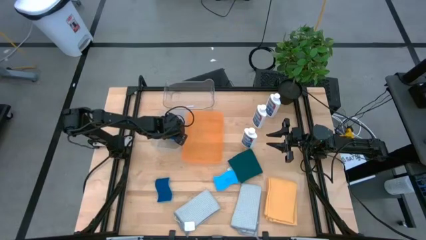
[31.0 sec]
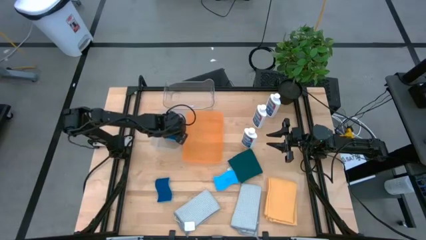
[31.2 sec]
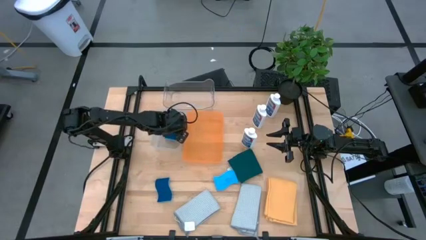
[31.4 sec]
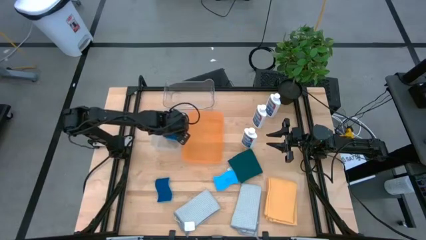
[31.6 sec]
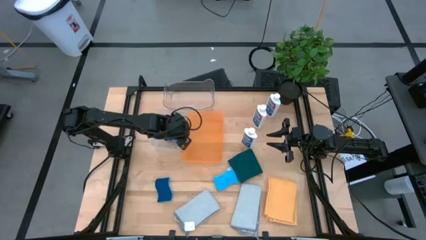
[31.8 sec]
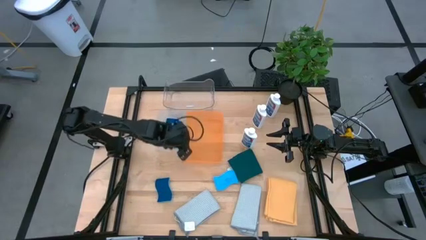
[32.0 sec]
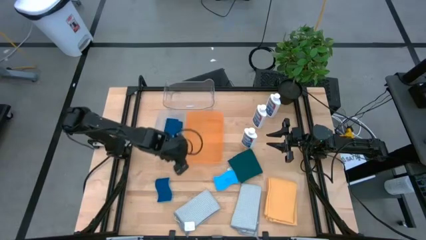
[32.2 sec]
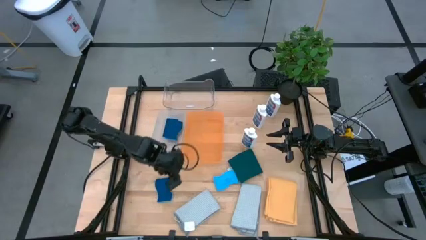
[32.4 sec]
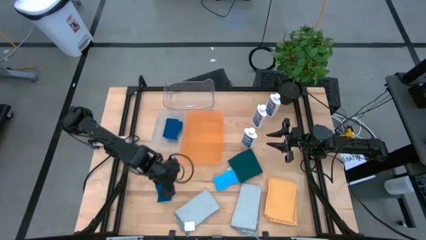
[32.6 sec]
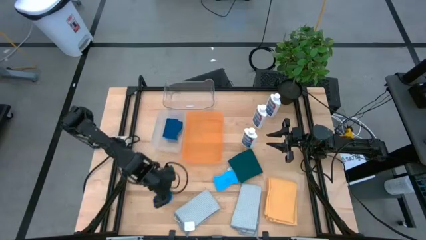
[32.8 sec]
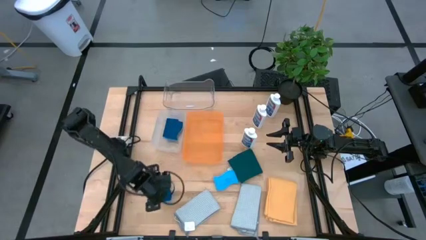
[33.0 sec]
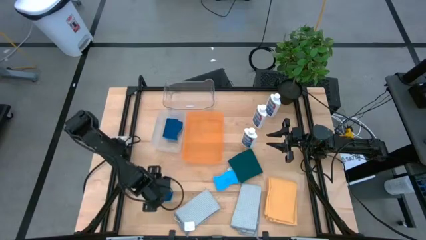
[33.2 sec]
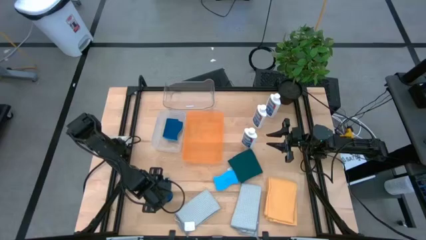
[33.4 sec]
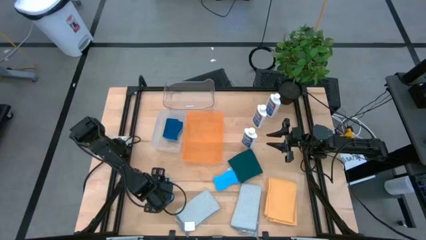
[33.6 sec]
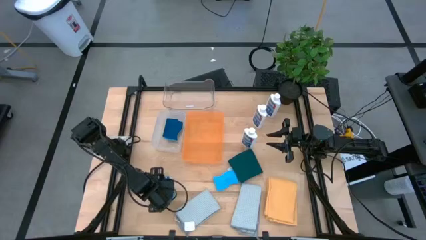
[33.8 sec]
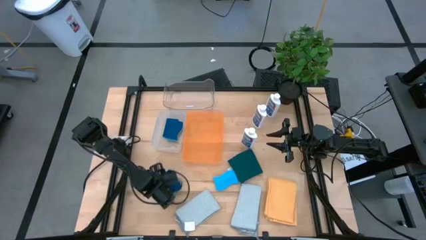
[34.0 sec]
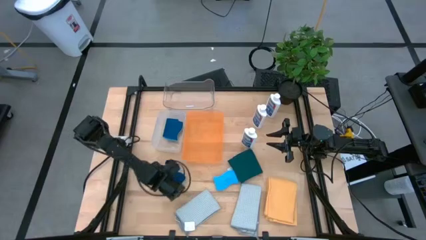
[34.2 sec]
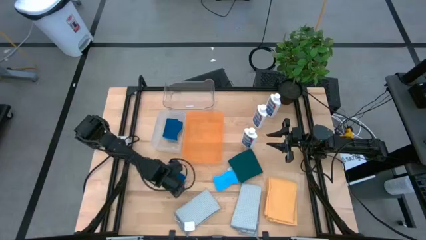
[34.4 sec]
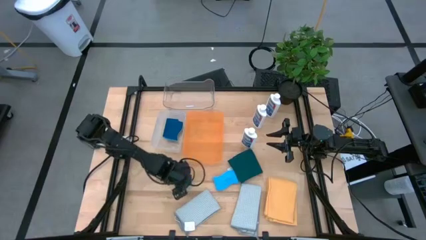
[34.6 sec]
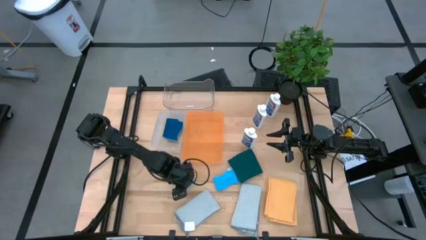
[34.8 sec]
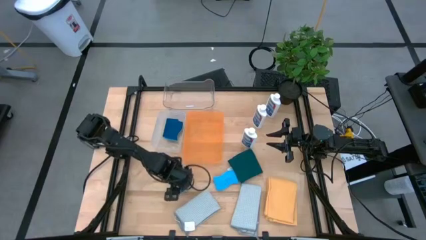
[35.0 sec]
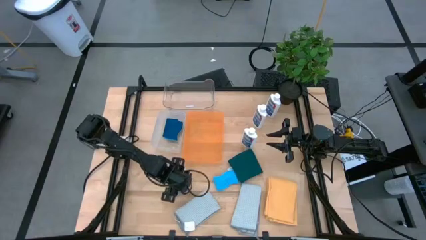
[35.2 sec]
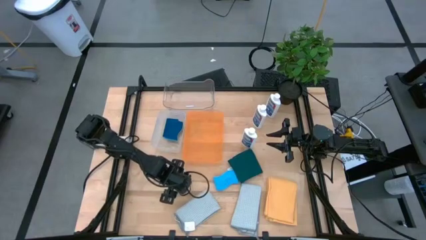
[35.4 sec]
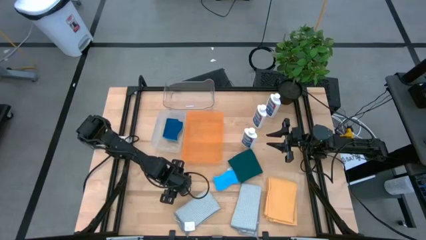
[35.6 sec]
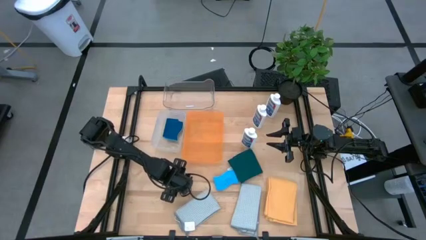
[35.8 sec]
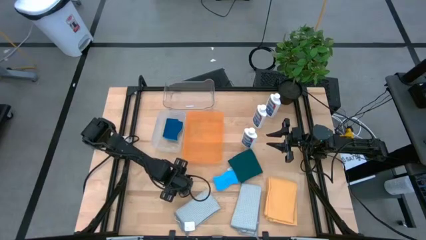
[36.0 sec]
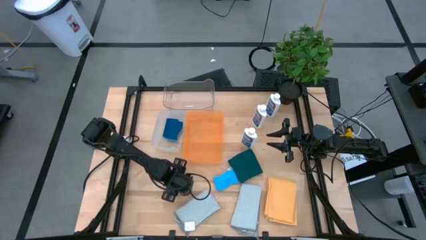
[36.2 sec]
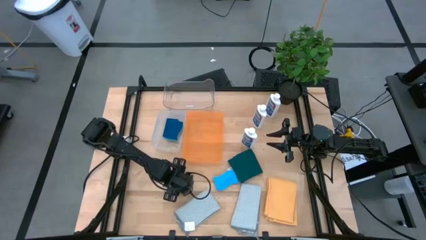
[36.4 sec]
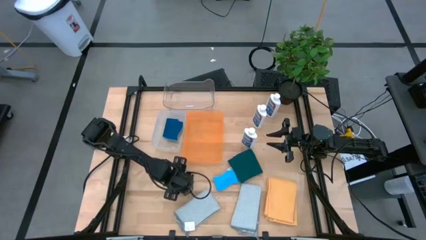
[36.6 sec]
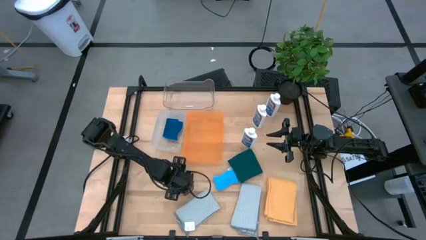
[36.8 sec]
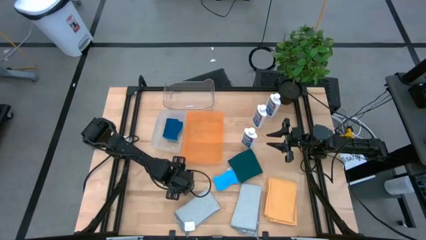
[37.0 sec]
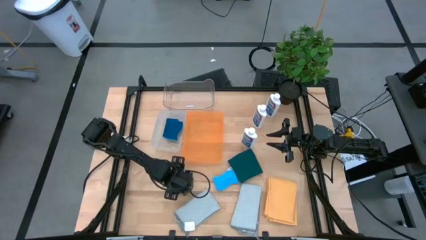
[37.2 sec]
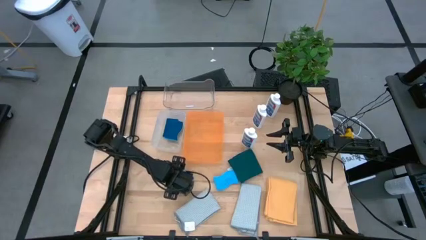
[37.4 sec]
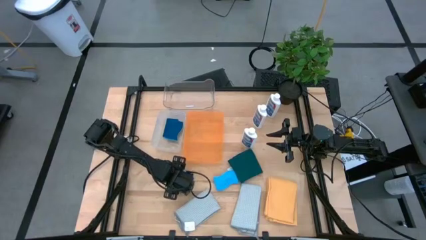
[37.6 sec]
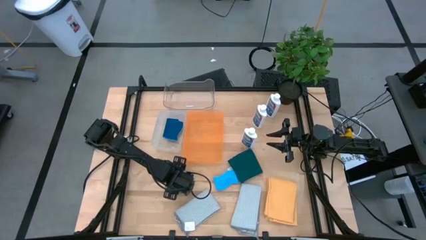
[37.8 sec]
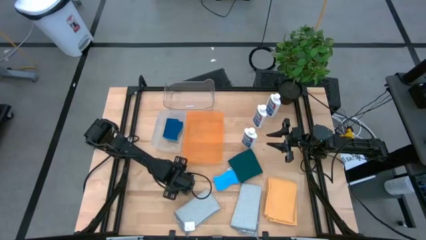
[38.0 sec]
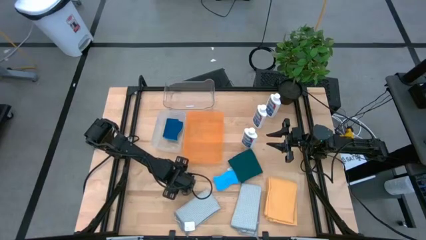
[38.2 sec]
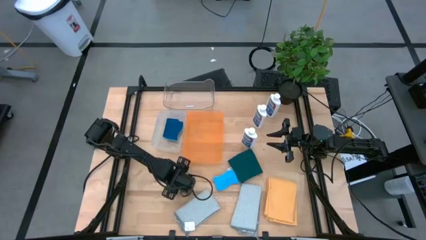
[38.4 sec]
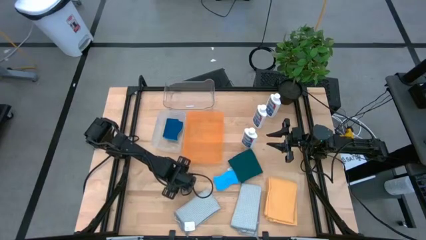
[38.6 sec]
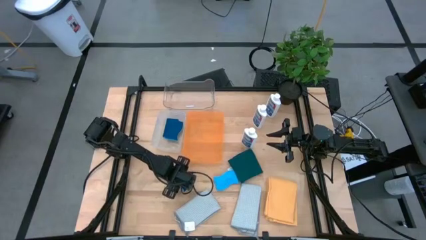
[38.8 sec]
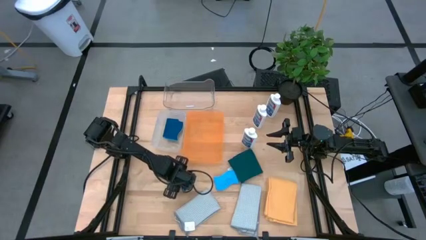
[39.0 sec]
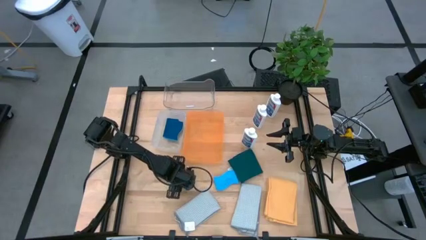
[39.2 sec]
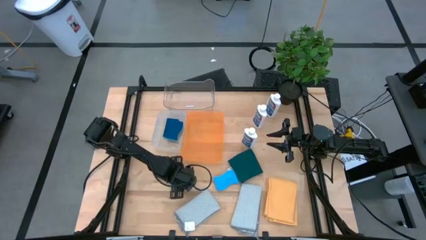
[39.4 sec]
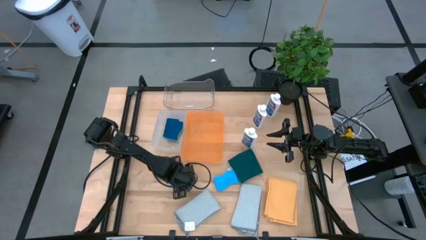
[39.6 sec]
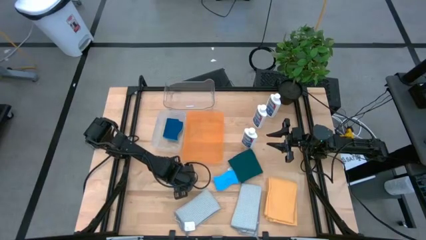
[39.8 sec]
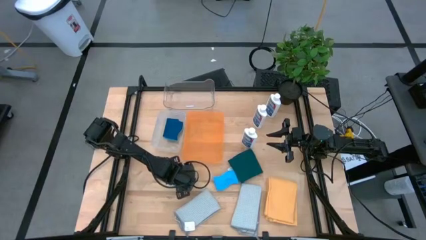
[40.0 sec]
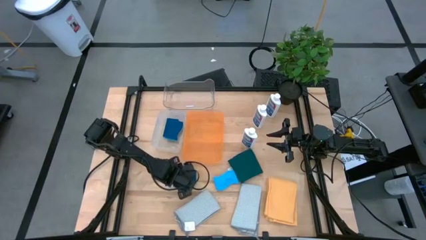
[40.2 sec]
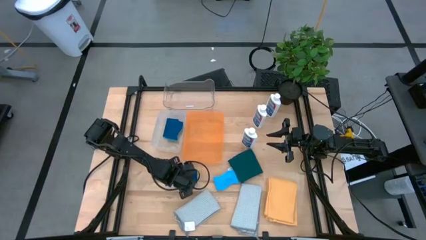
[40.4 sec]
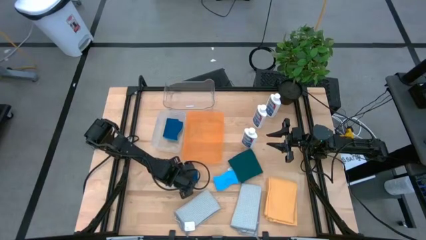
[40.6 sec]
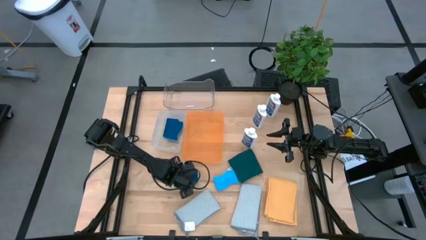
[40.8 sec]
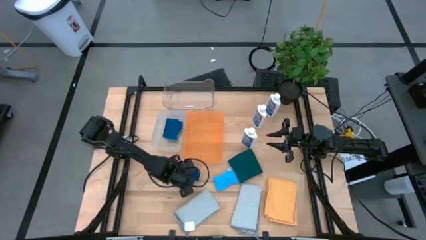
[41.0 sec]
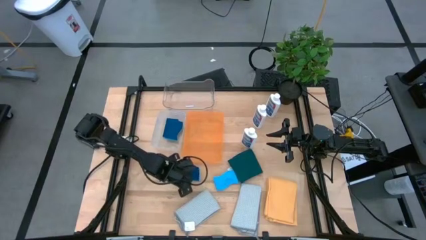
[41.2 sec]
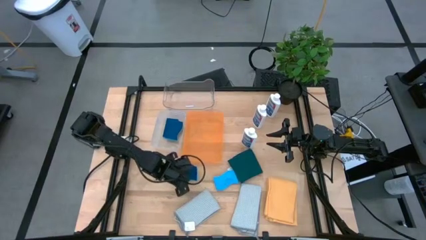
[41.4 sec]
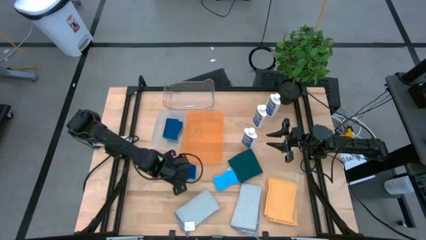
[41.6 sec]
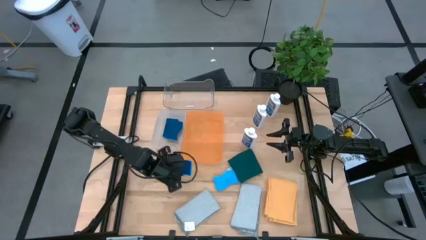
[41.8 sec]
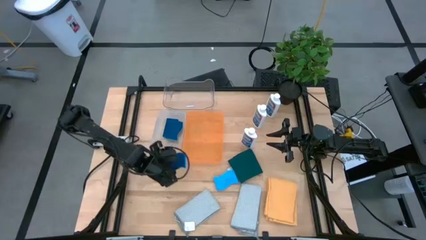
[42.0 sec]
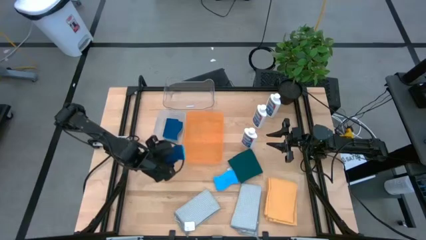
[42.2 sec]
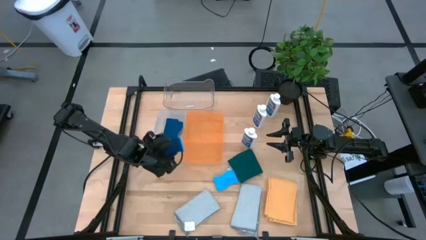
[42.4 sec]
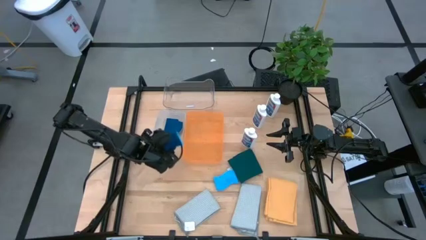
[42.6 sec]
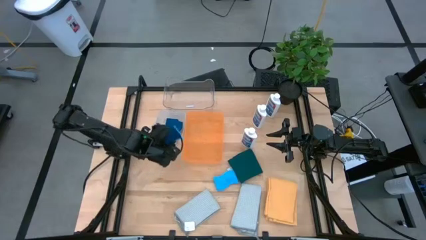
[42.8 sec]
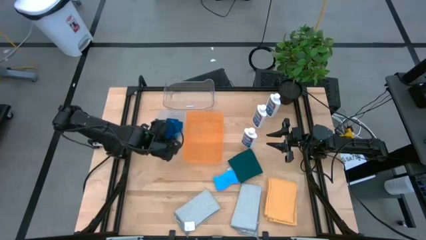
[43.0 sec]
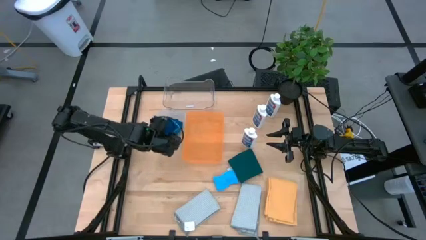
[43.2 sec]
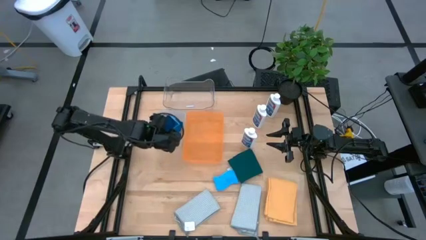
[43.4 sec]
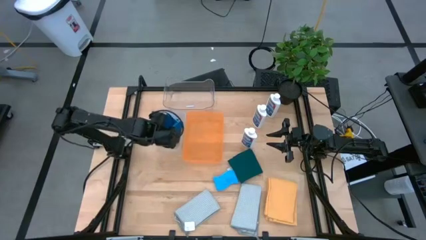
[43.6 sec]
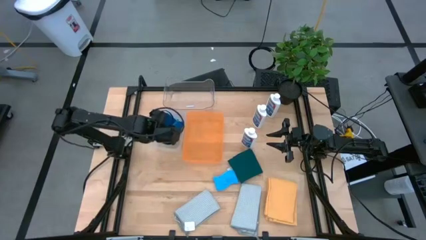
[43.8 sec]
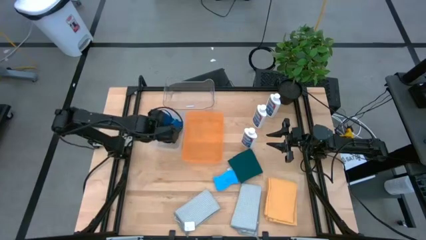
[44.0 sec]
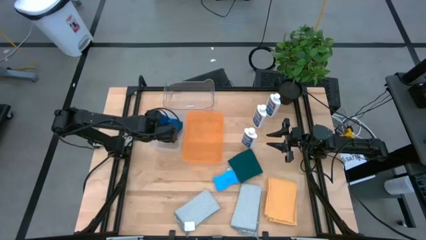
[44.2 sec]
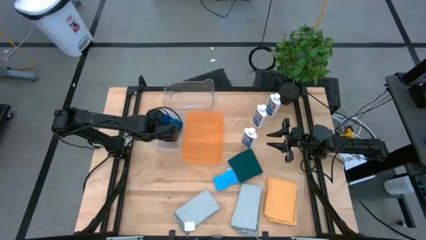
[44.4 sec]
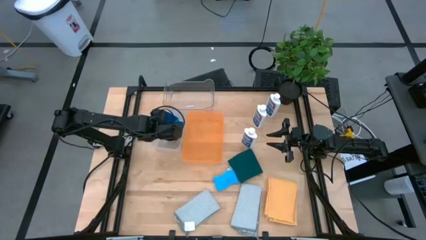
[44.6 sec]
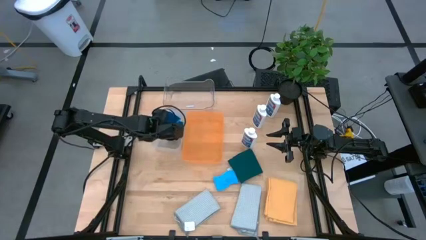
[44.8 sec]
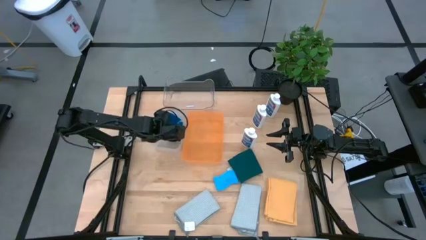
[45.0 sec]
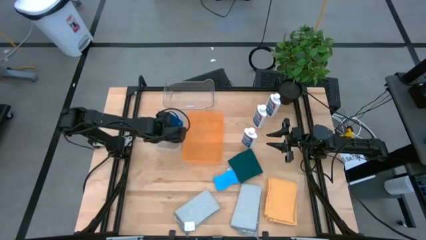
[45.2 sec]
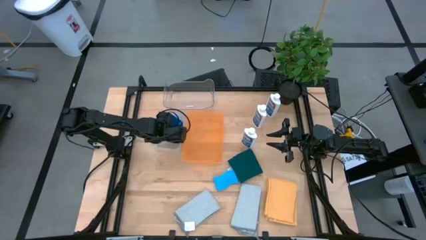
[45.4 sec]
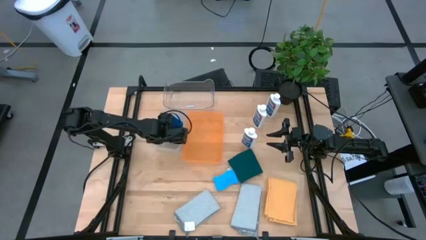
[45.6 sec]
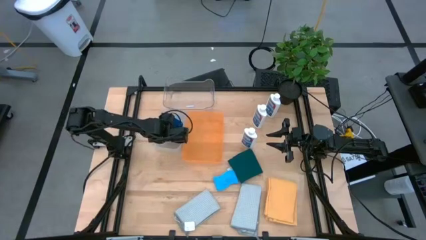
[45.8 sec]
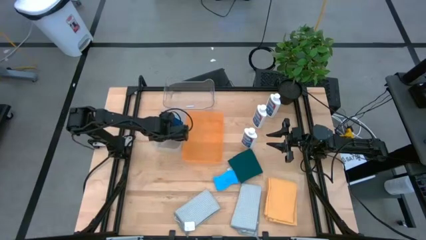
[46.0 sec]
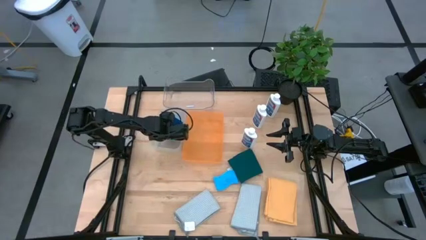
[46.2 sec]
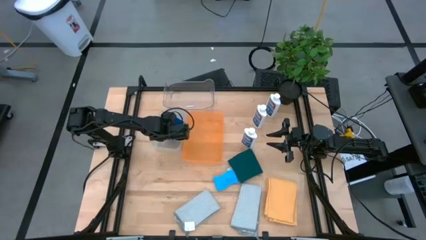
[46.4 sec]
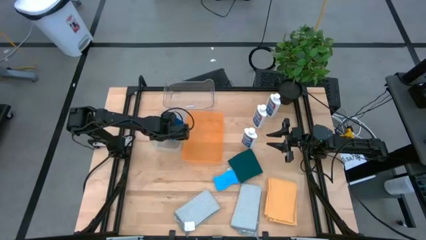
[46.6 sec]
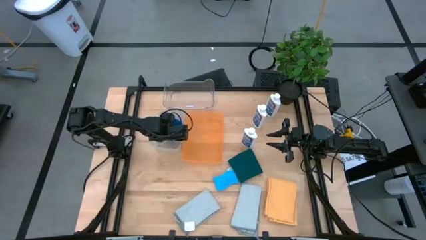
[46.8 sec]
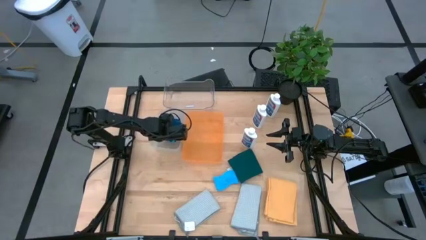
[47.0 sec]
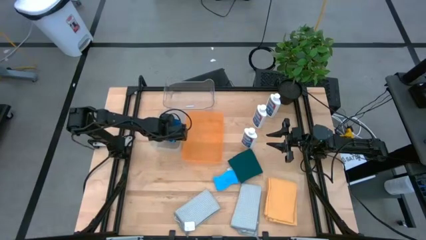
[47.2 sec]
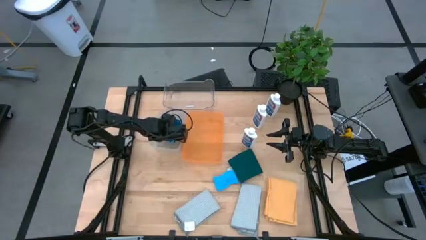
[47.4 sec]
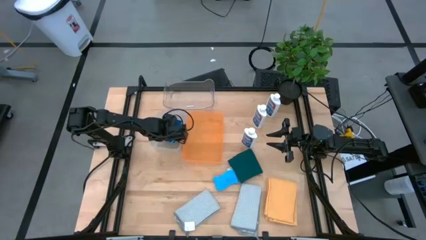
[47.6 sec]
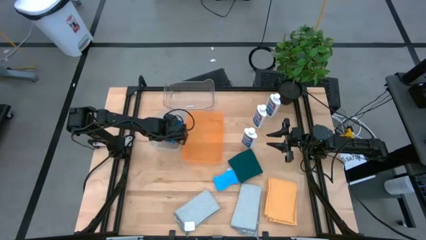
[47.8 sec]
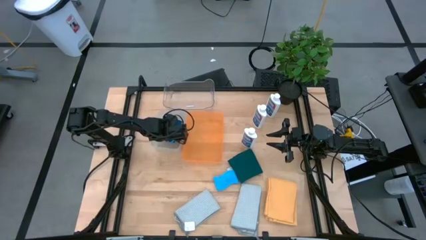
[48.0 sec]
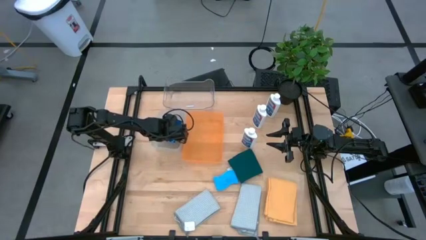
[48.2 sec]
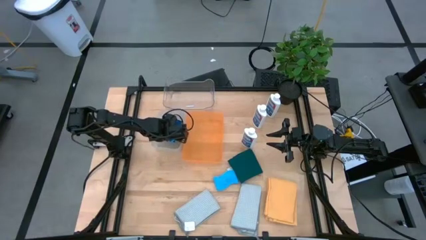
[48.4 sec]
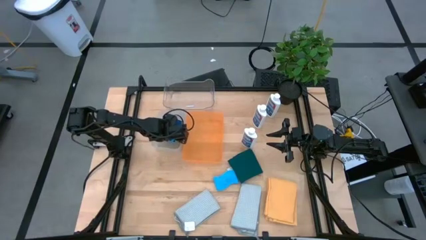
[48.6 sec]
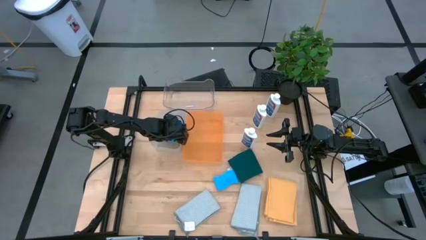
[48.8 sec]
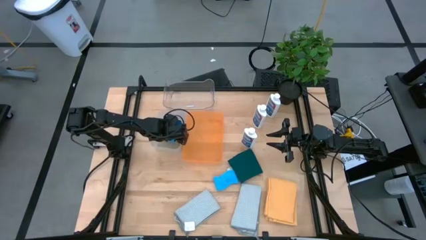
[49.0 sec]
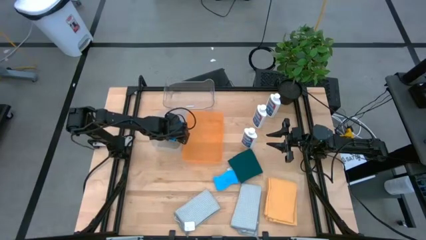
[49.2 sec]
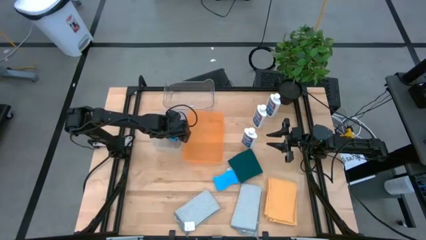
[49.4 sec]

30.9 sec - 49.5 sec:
Task: Pick & Place Kitchen Items
Put the sponge into the white bin
